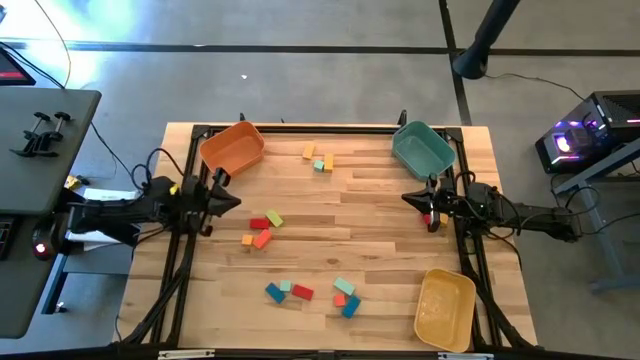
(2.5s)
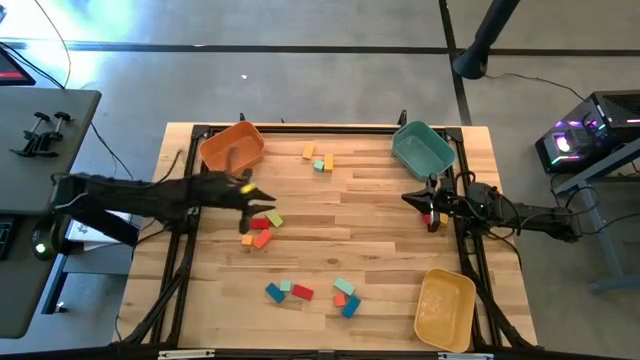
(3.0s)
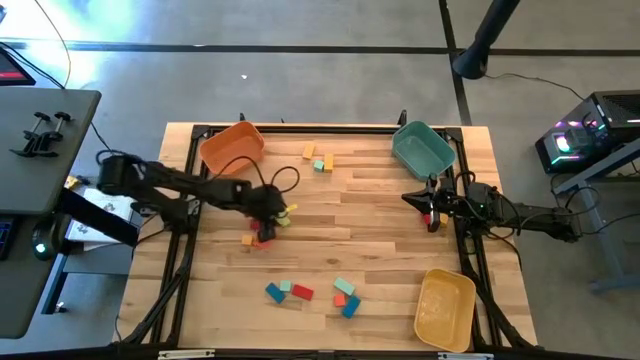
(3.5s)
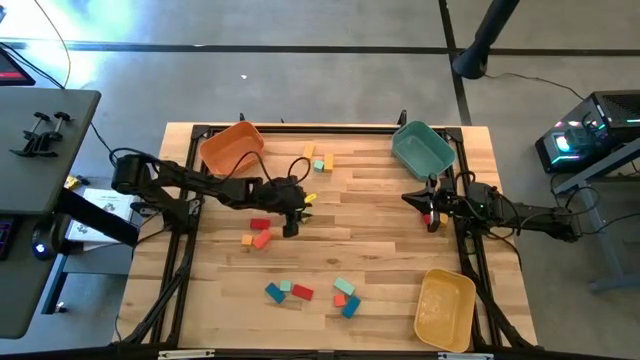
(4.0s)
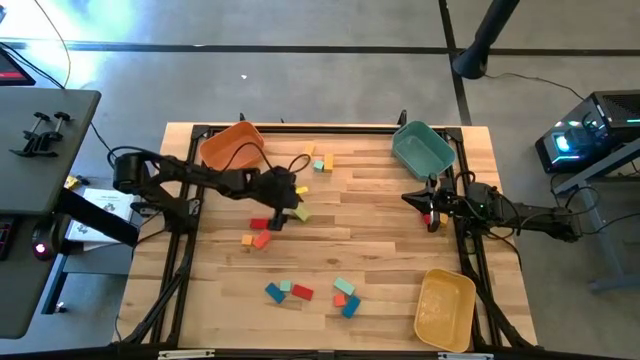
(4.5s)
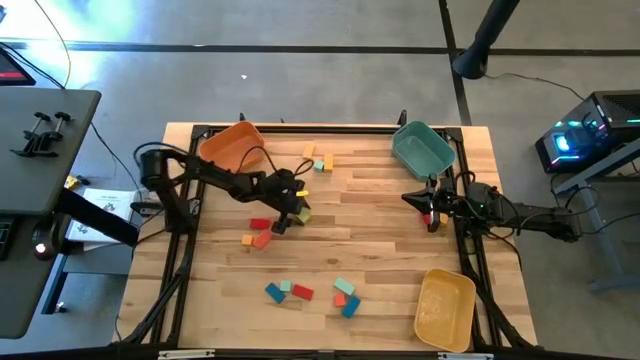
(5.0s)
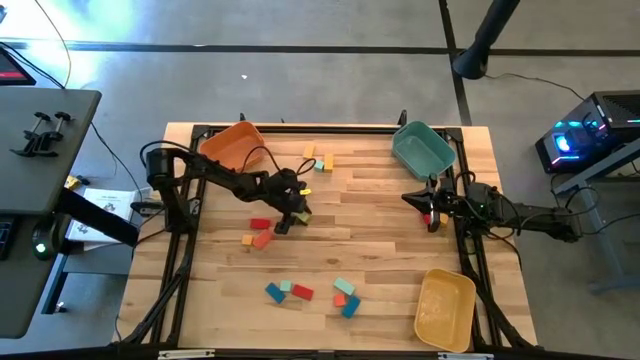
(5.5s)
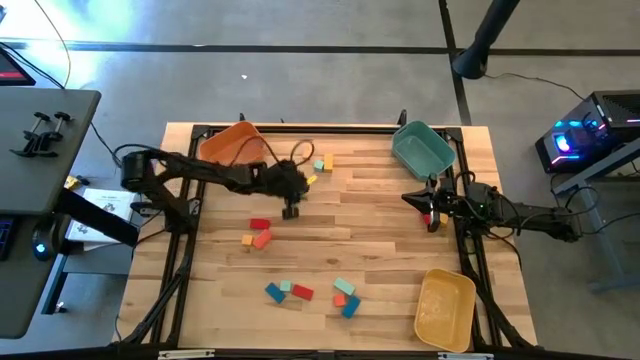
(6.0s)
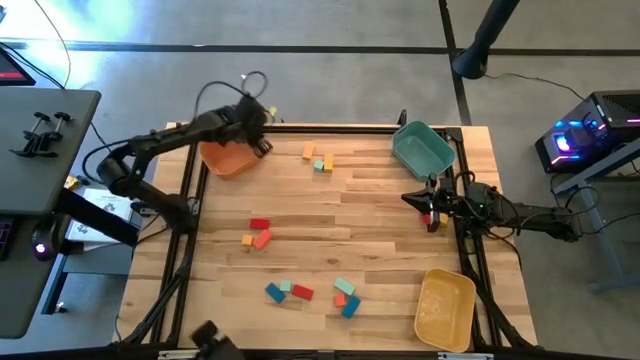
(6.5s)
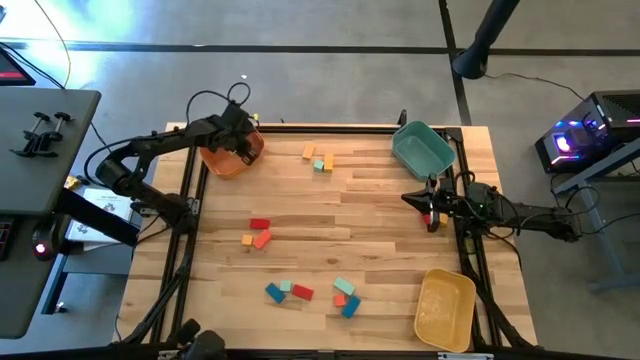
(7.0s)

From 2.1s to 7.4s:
Task: Sort blocks by size
Put the thin green rectangular block into the orange bin

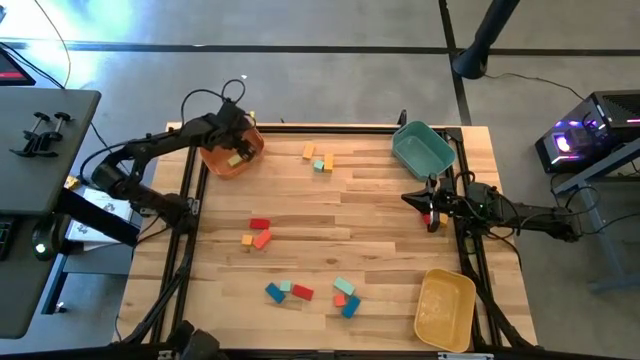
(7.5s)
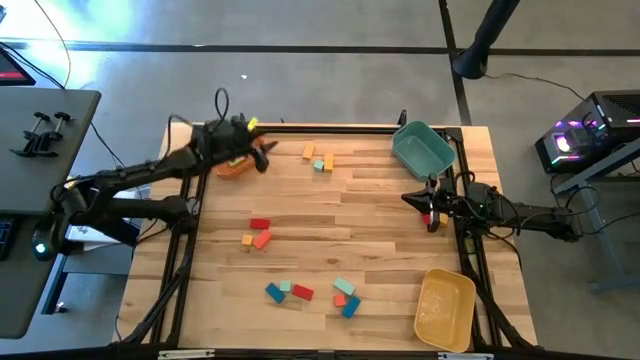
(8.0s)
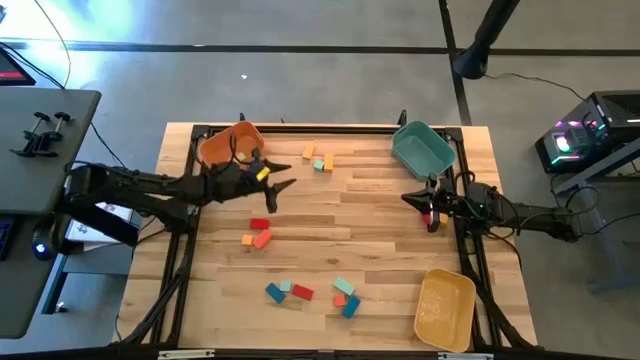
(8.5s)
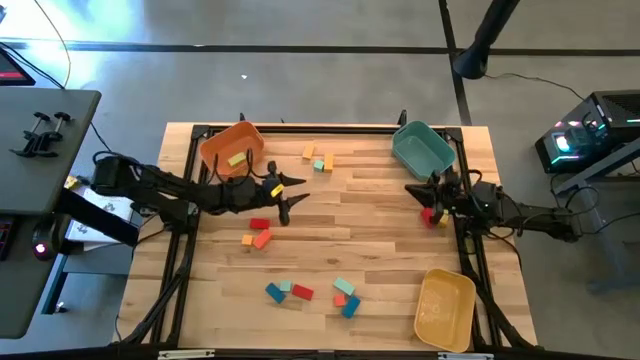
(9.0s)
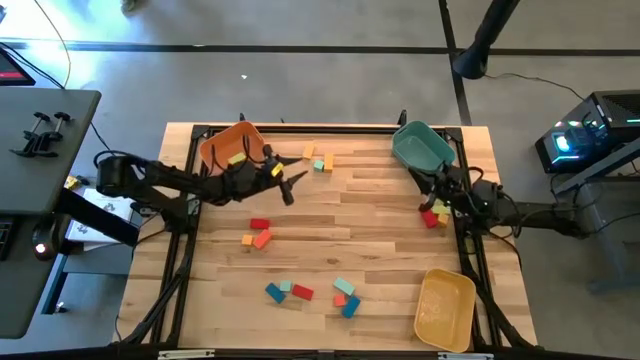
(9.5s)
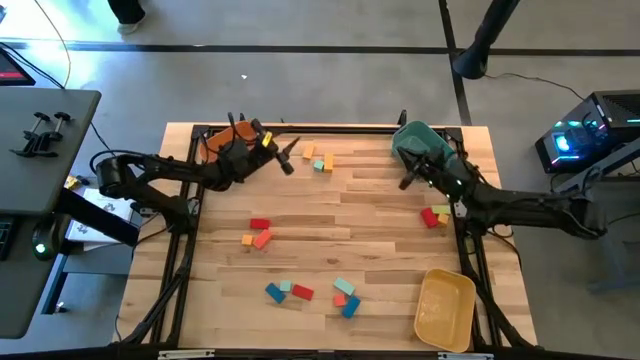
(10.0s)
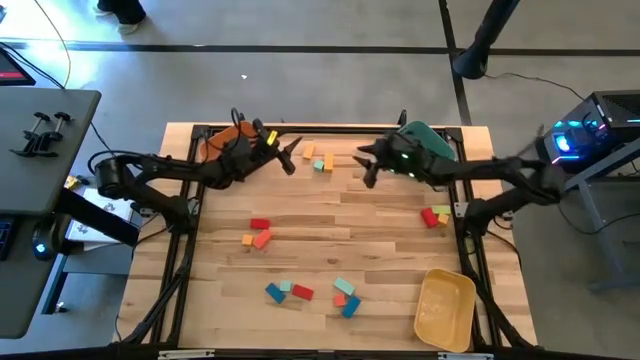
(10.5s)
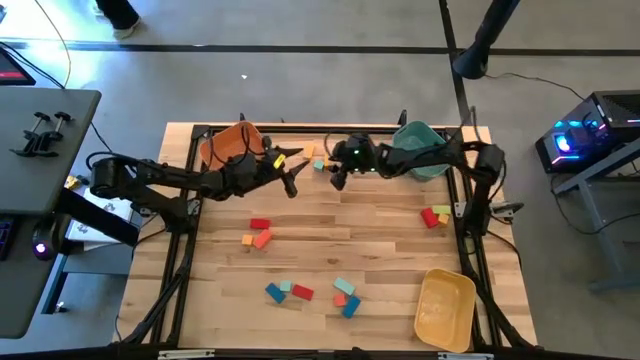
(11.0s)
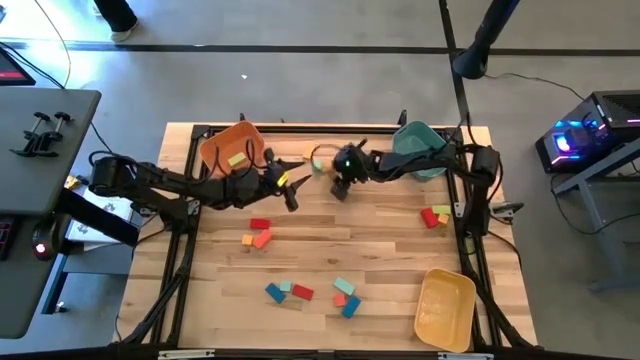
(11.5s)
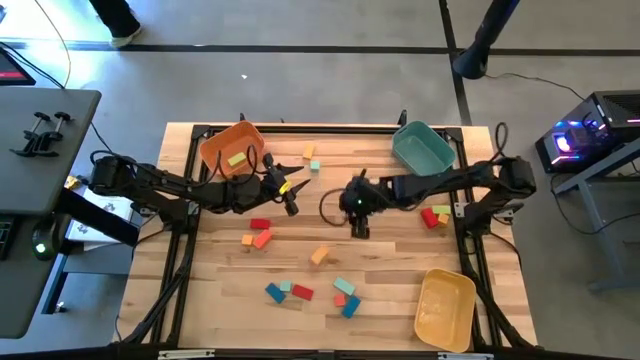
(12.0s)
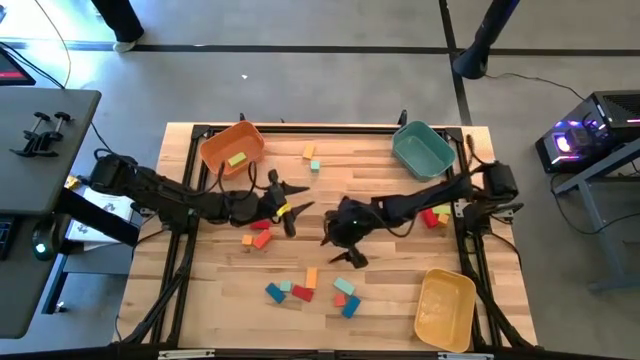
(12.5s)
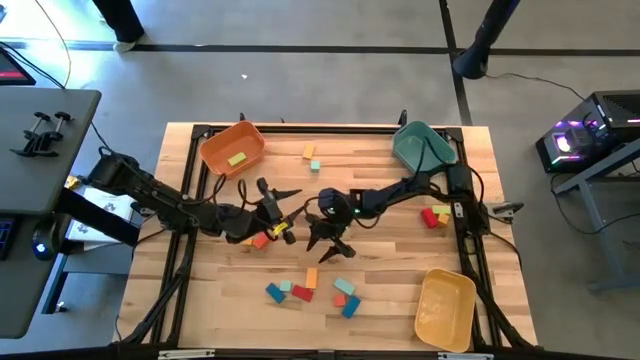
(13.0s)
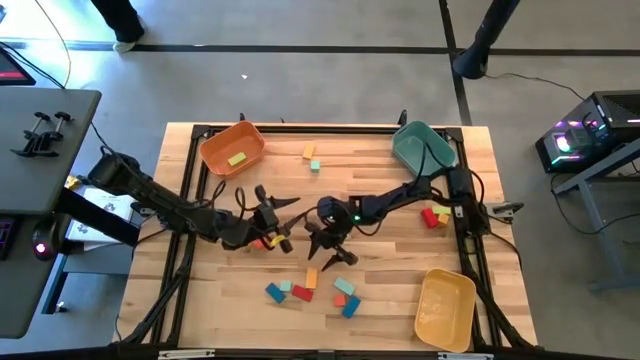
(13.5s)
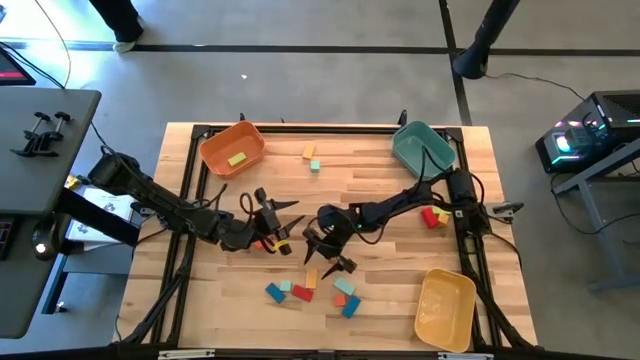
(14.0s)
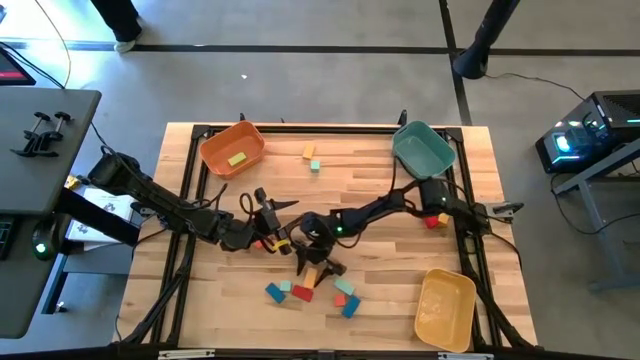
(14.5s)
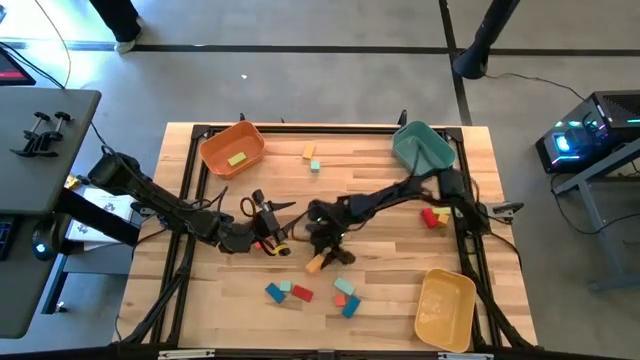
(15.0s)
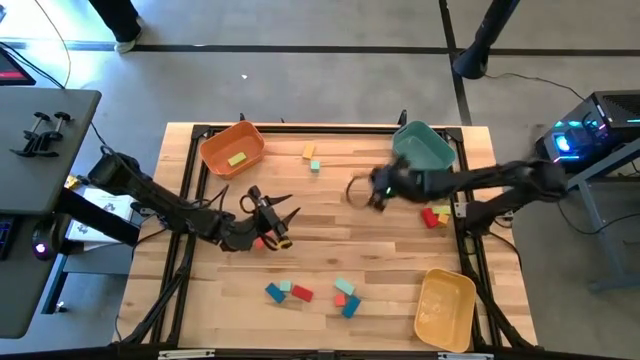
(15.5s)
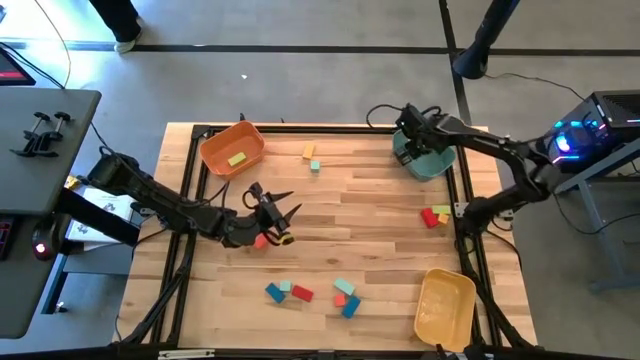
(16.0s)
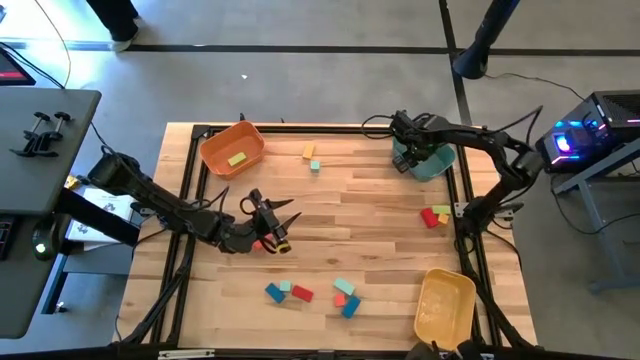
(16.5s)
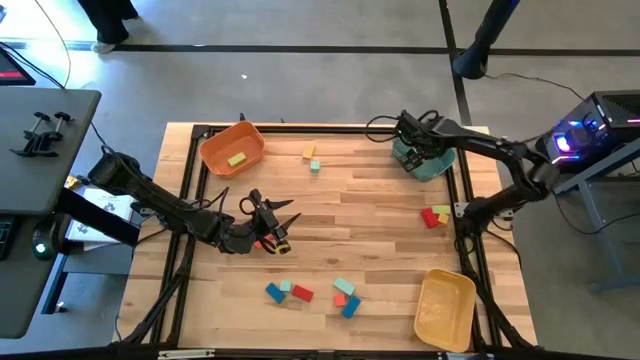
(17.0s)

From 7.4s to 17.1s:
Put the thick yellow rectangular block into the green bin

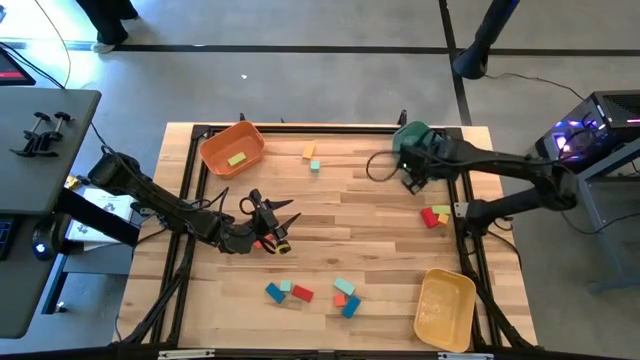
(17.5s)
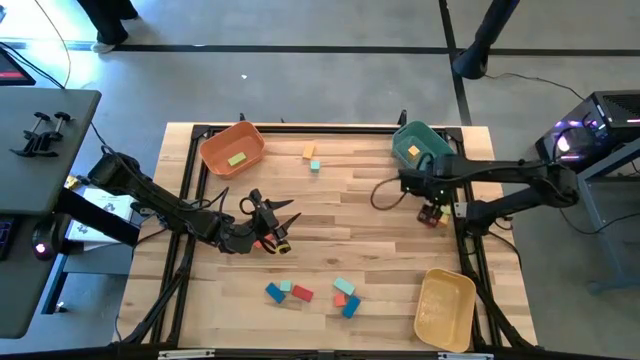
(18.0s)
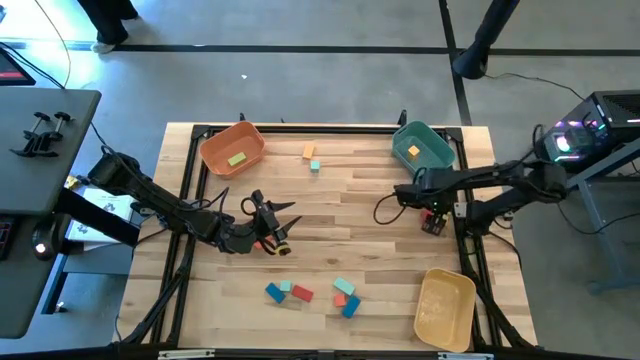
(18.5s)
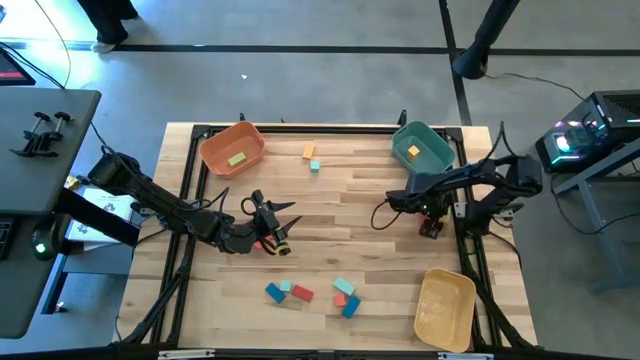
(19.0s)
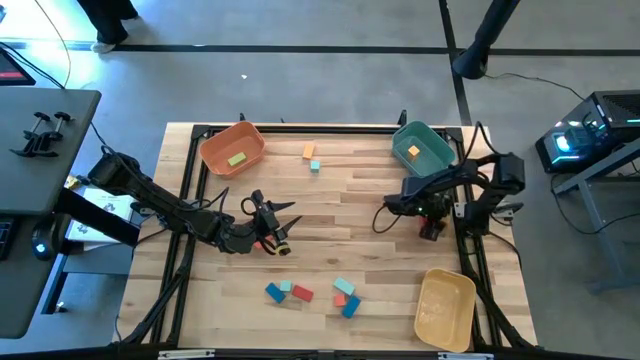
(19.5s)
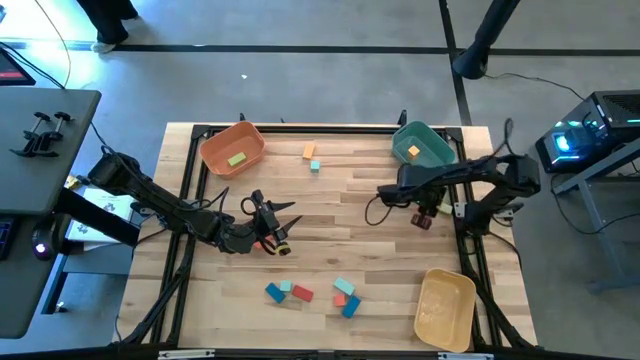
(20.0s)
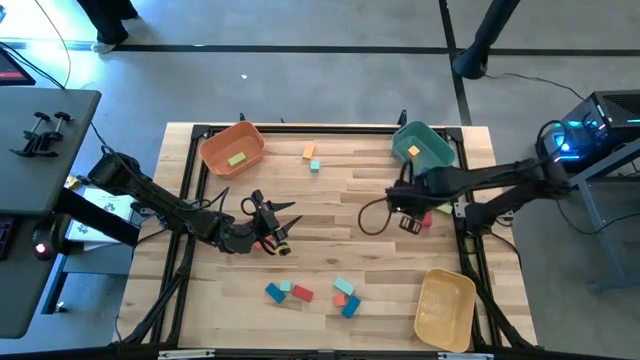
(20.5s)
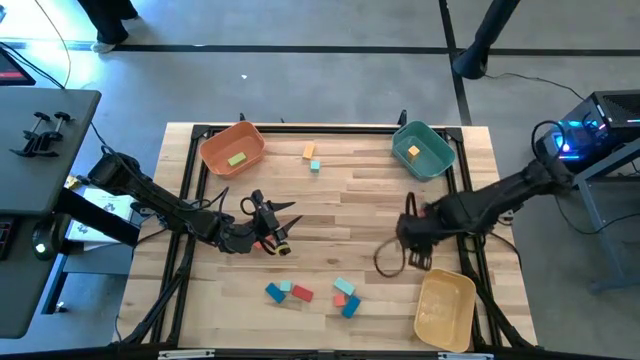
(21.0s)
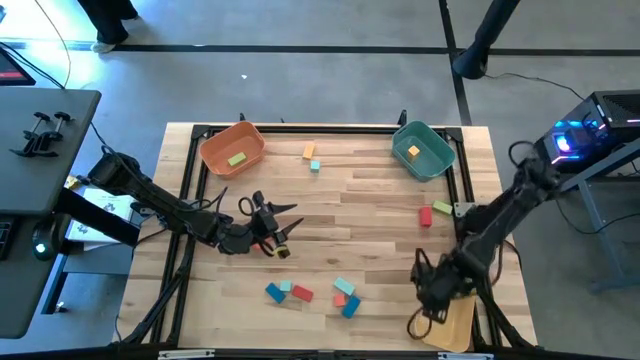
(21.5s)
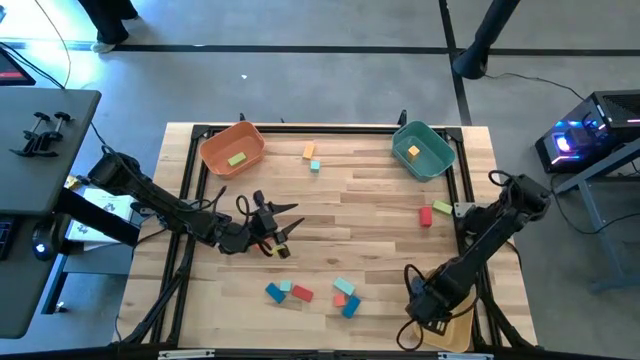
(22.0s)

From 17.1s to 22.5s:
Put the yellow cube block into the yellow bin
